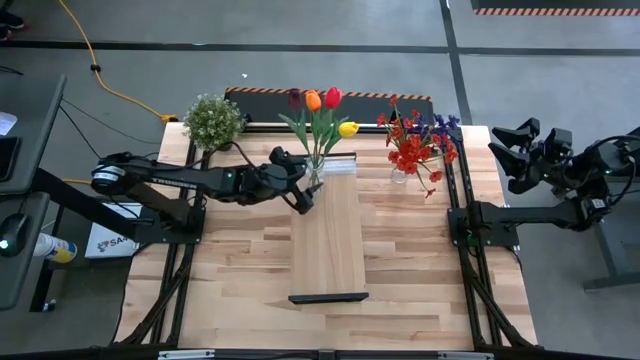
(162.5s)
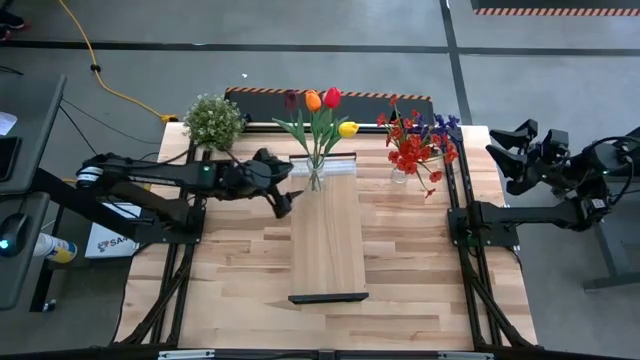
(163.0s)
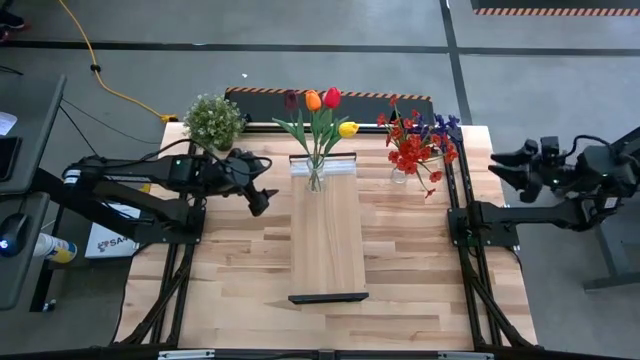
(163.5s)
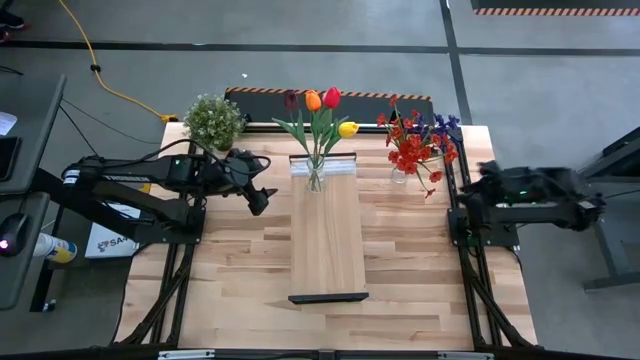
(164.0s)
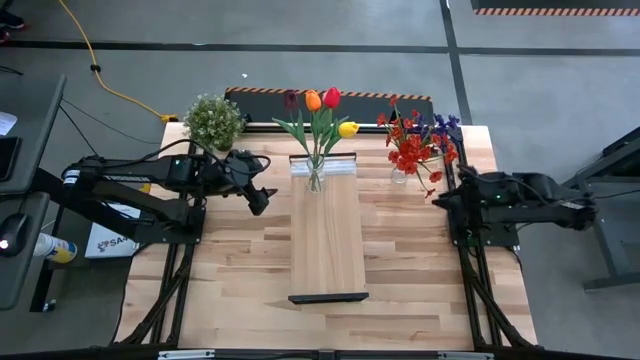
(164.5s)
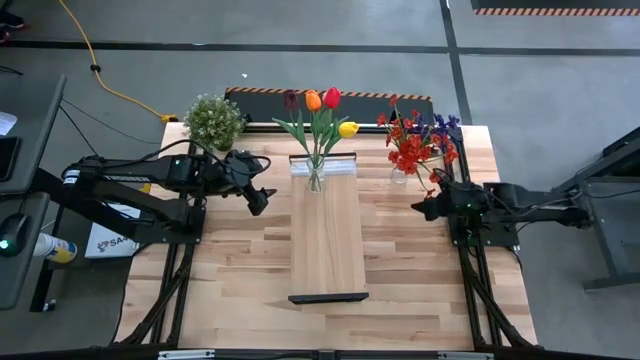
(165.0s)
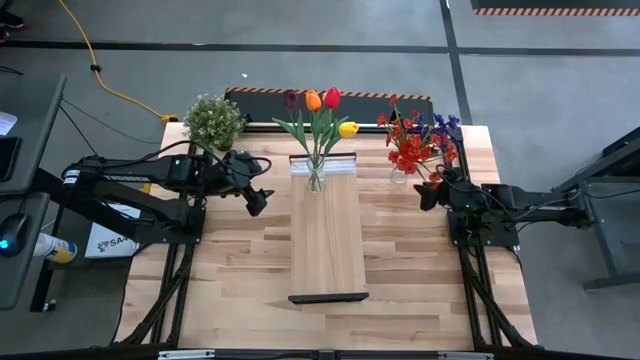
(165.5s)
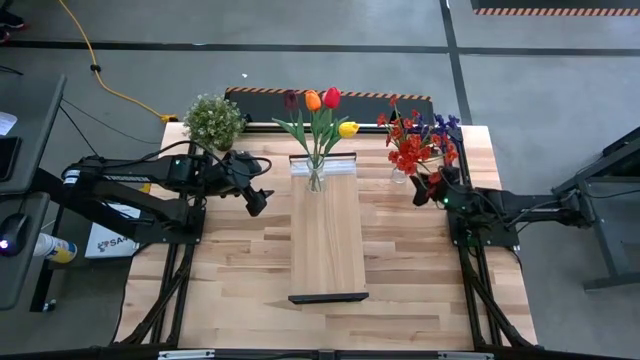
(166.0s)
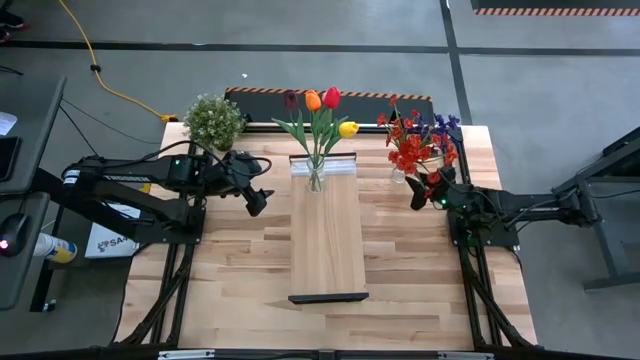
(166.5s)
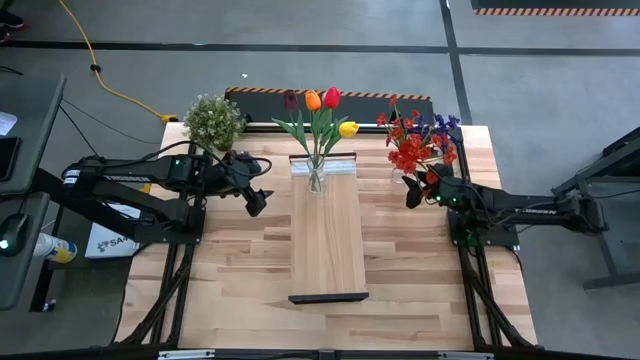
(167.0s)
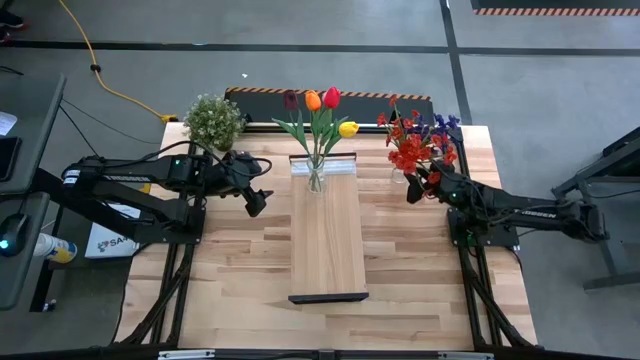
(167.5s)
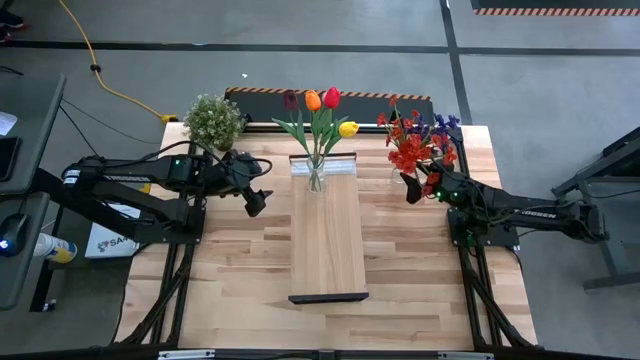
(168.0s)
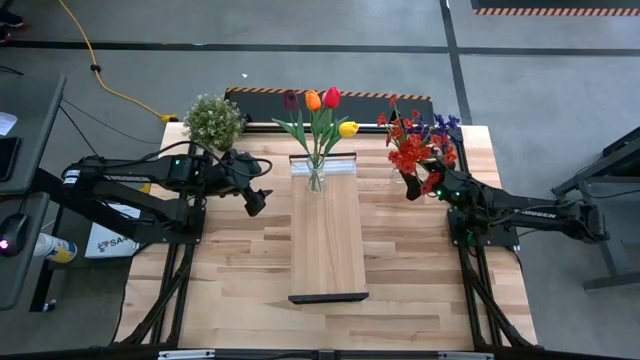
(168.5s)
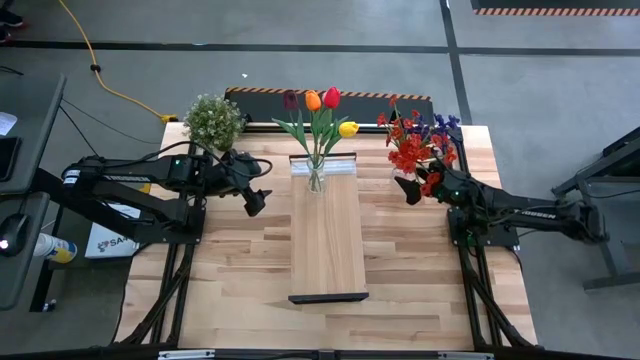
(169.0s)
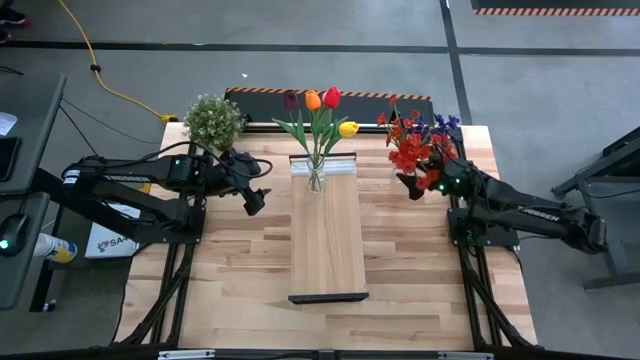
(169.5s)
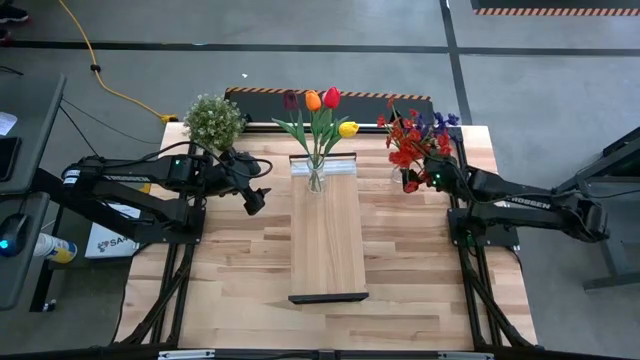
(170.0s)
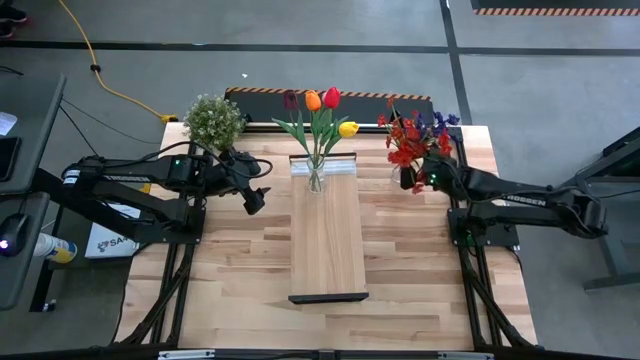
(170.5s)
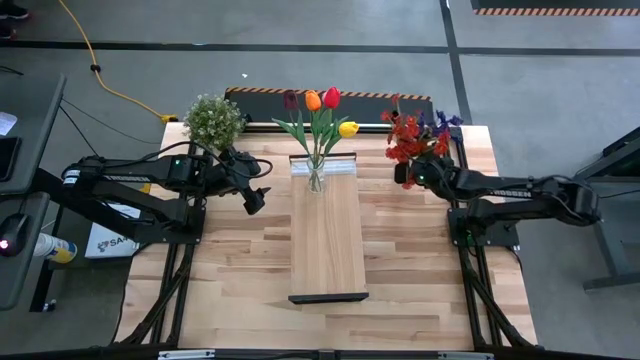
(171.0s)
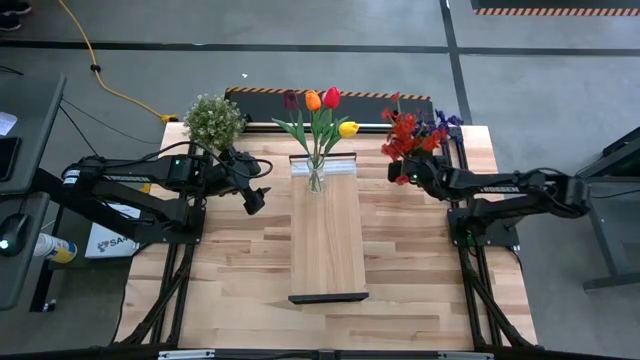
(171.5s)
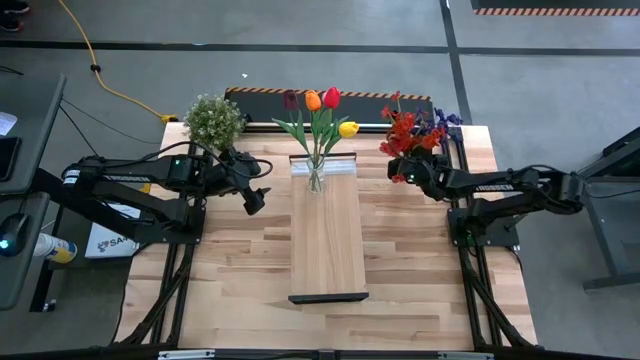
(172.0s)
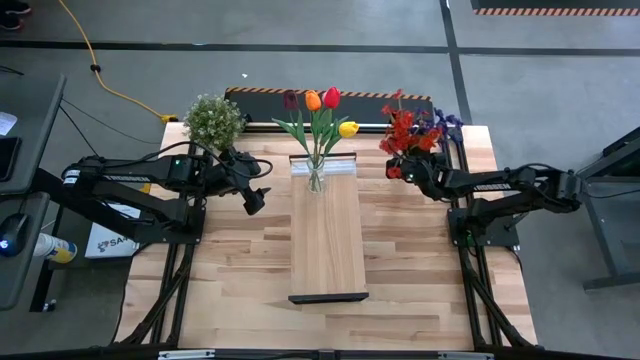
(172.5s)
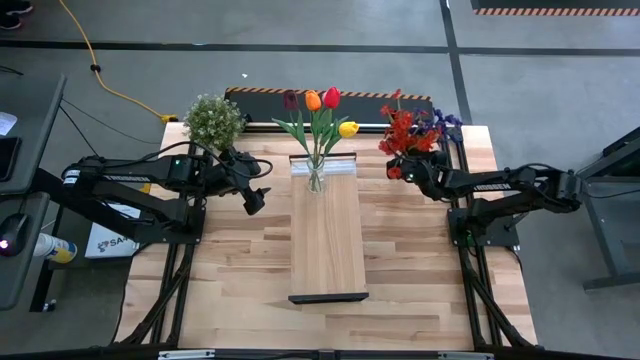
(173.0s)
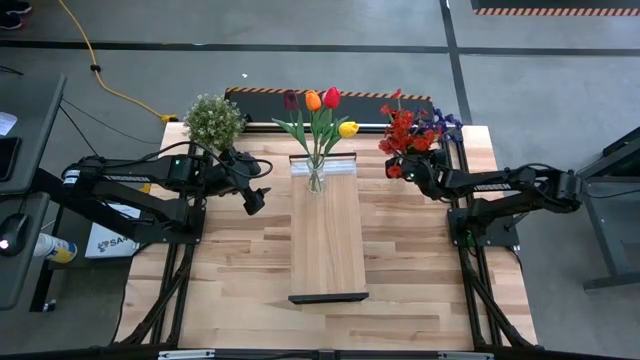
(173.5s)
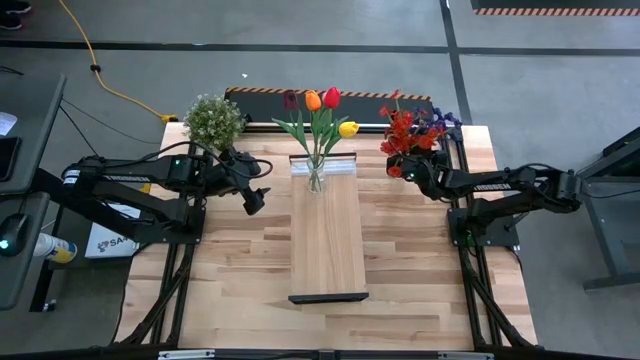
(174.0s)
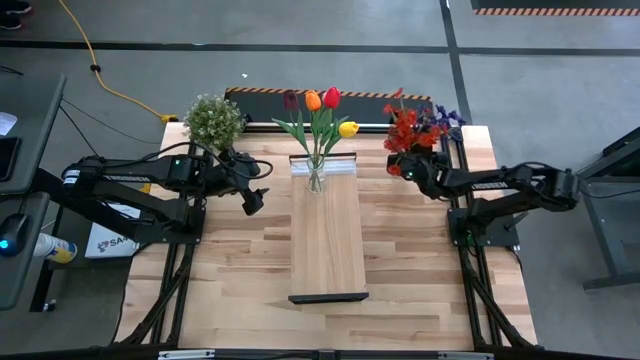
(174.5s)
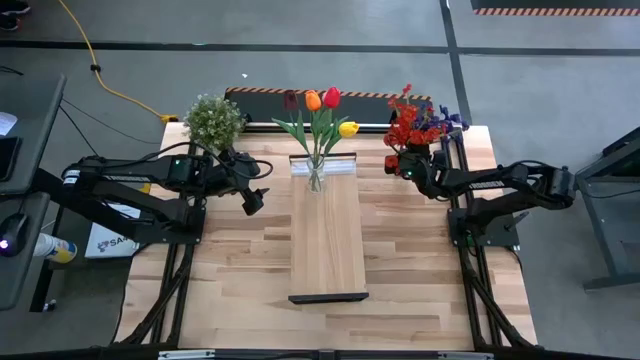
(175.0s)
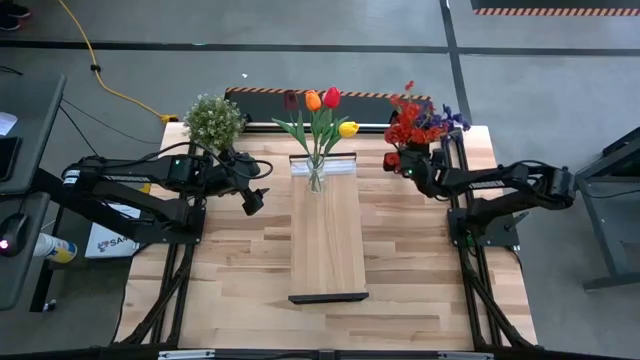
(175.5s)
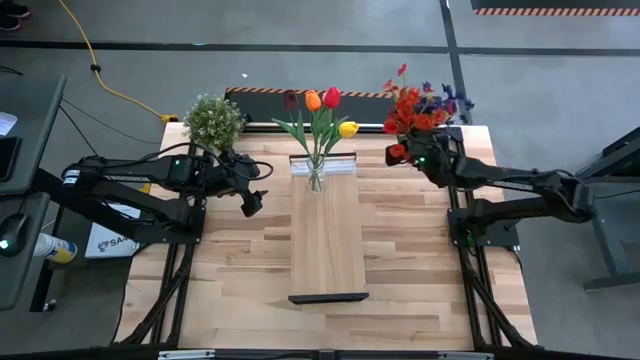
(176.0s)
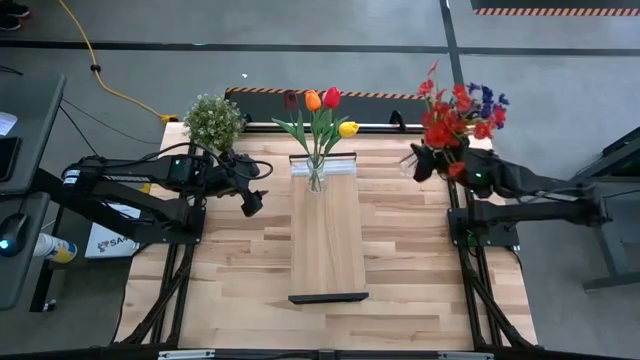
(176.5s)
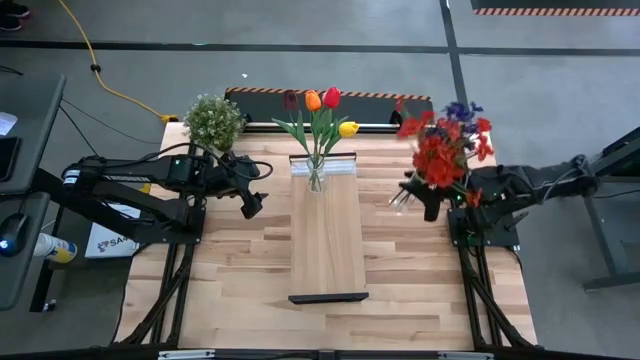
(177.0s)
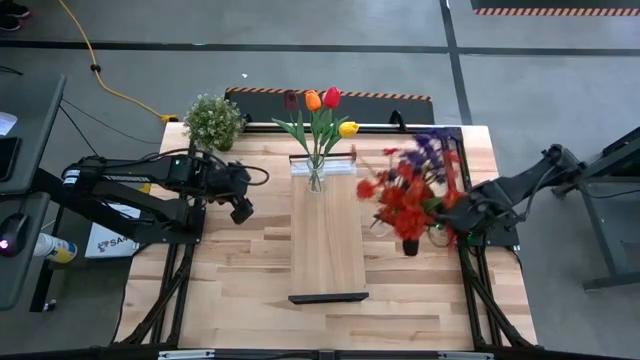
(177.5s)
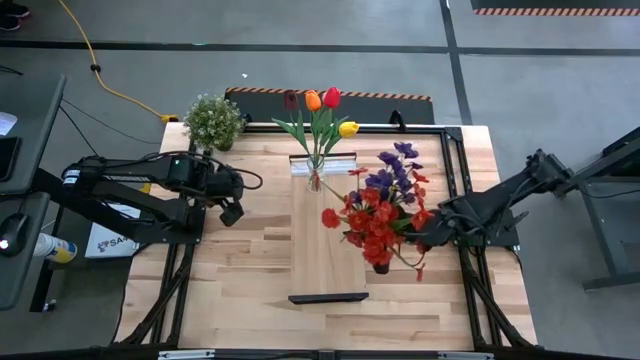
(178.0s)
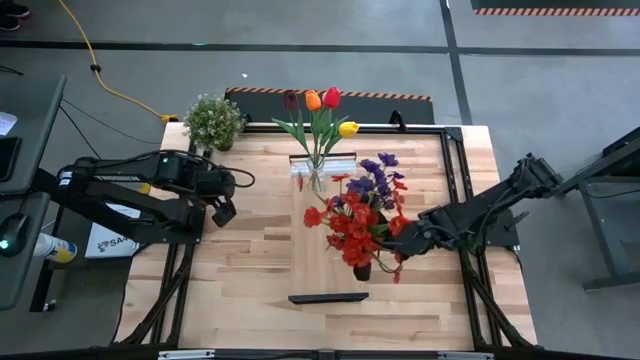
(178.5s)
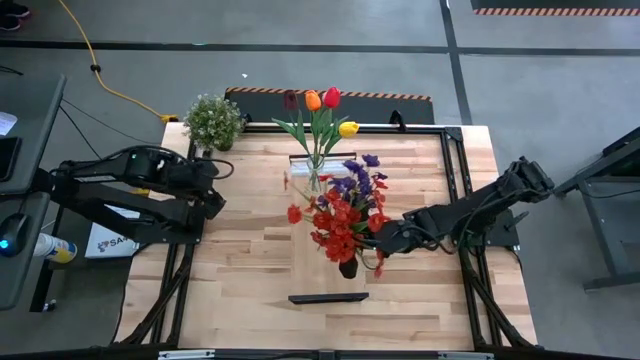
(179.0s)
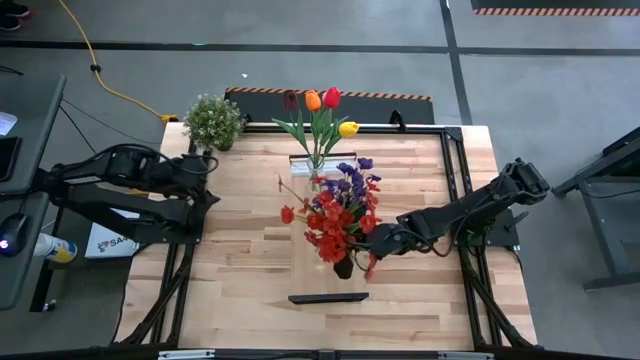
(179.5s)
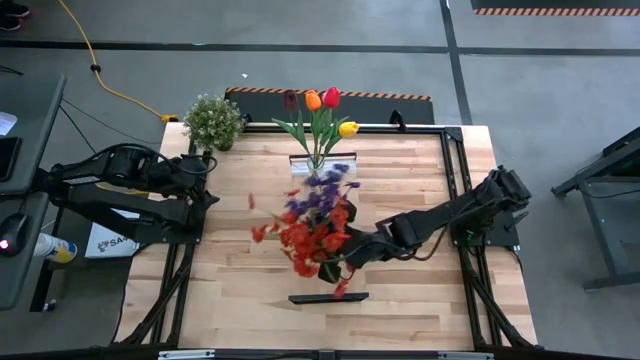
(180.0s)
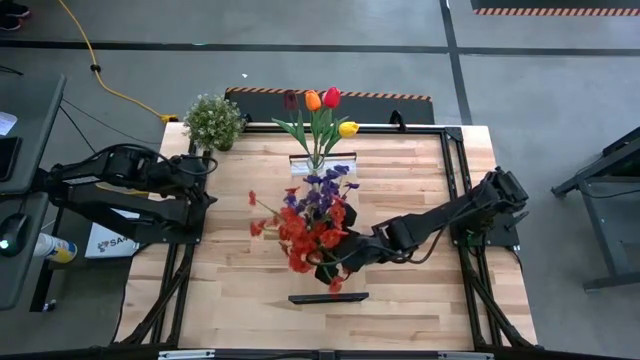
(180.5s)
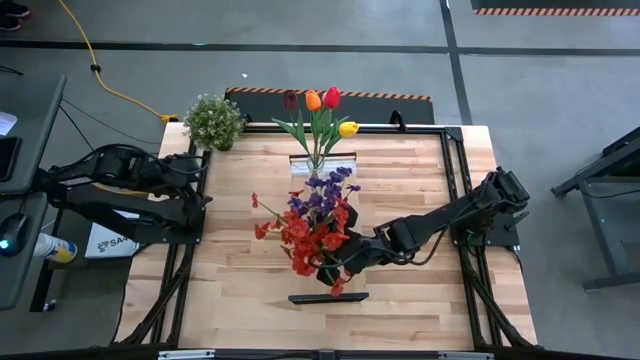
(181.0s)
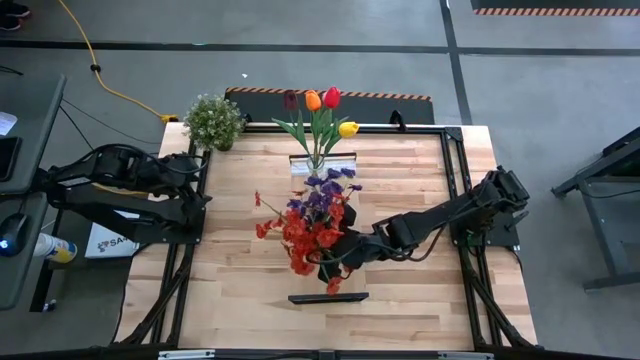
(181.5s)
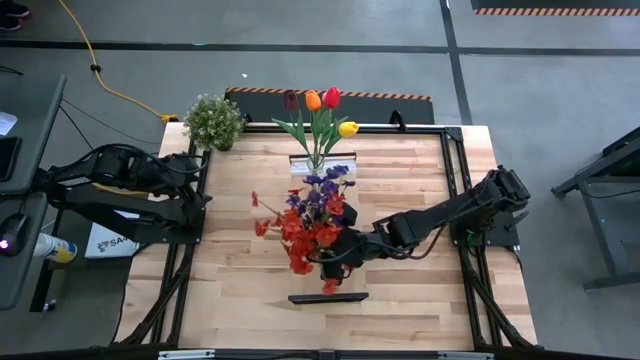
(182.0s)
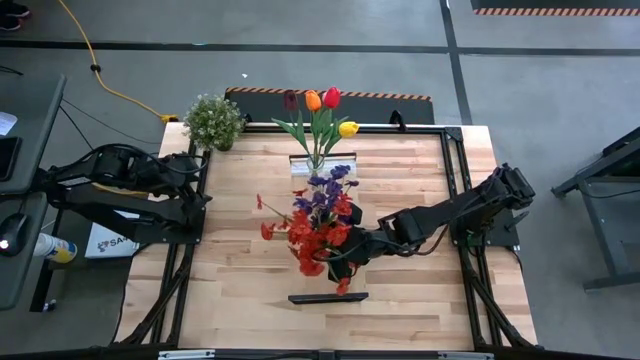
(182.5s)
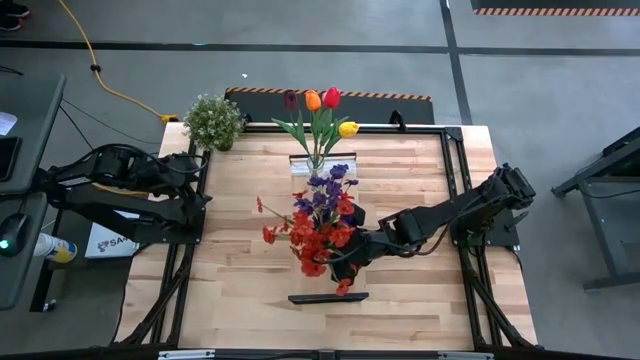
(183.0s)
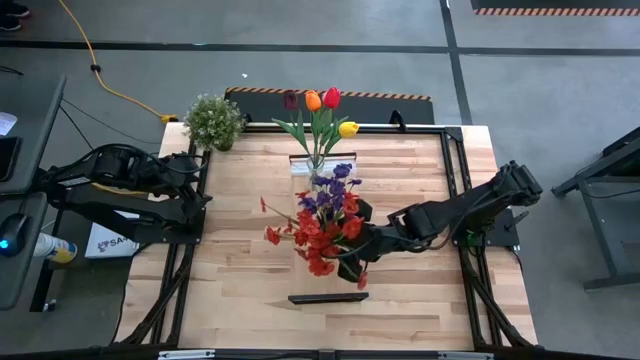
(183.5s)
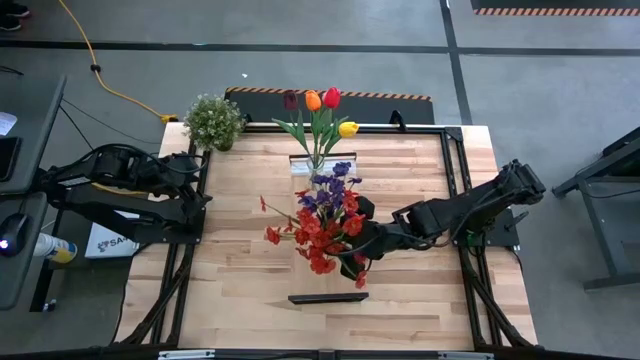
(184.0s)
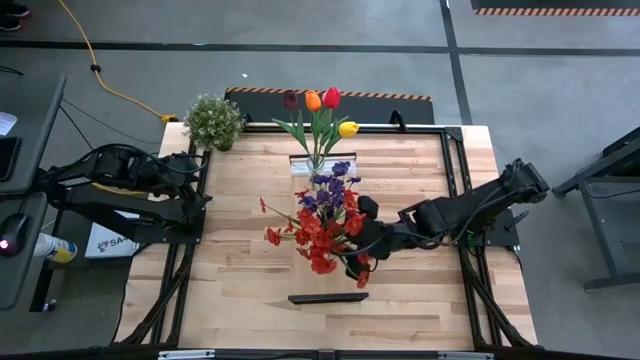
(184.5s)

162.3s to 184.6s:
Task: Pick and place flowers into a vace then onto a shelf
Put the transparent vase with flowers on the shelf
